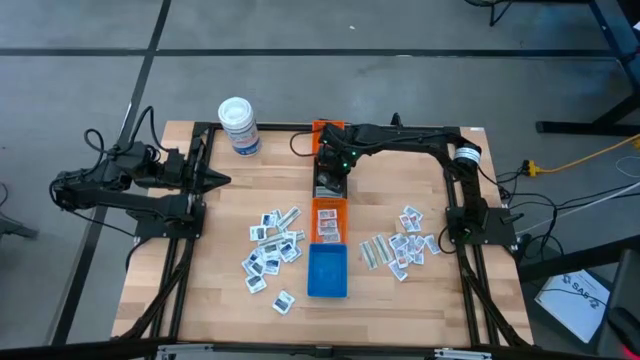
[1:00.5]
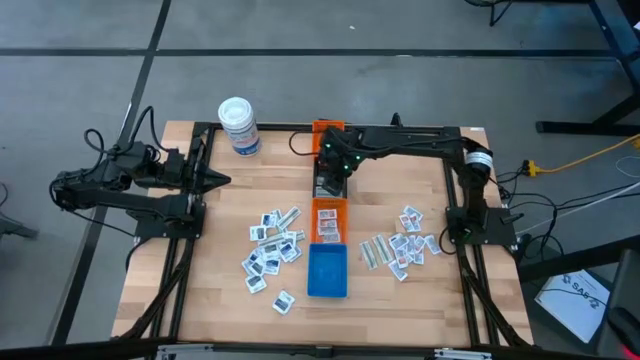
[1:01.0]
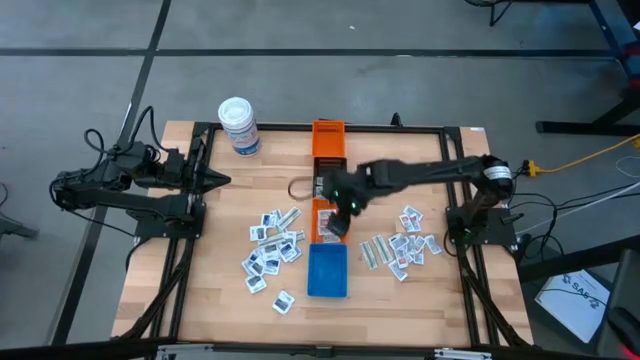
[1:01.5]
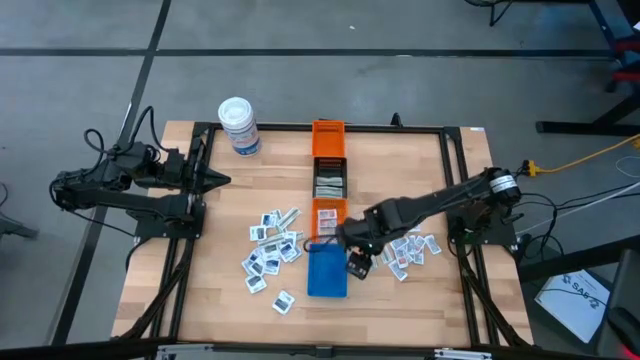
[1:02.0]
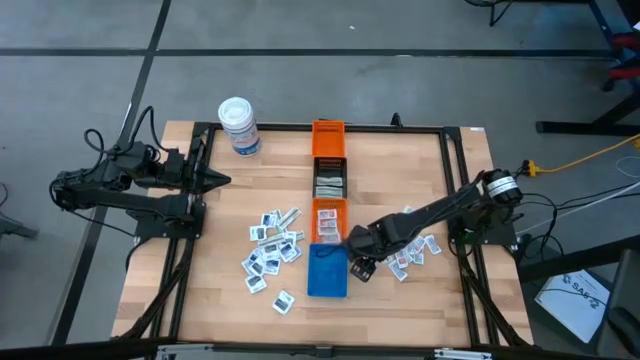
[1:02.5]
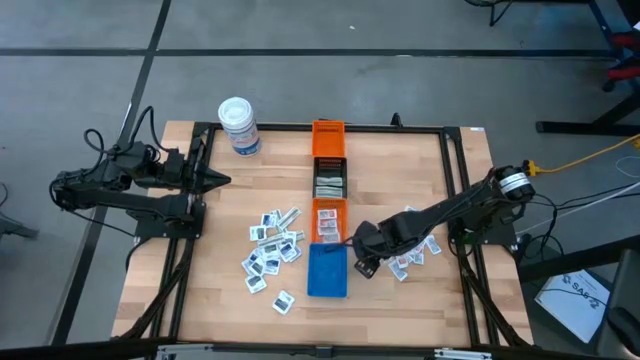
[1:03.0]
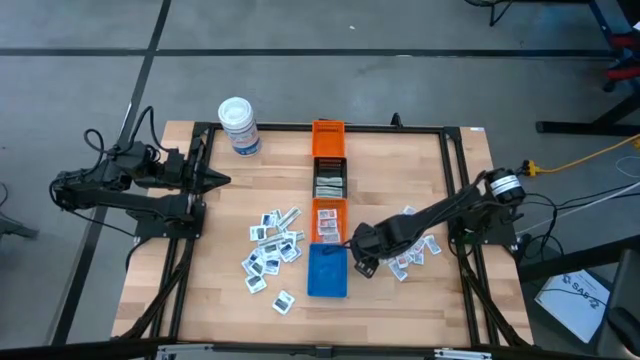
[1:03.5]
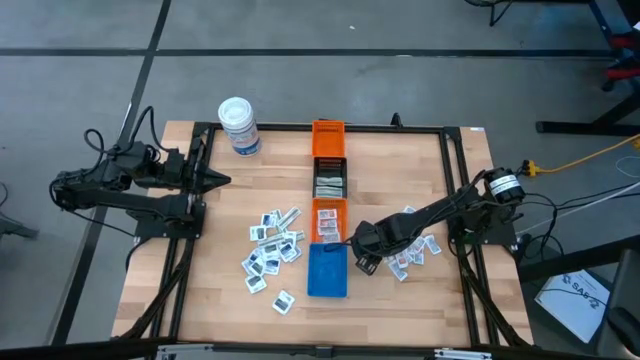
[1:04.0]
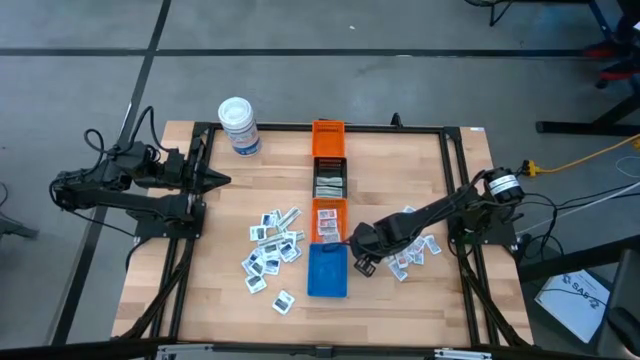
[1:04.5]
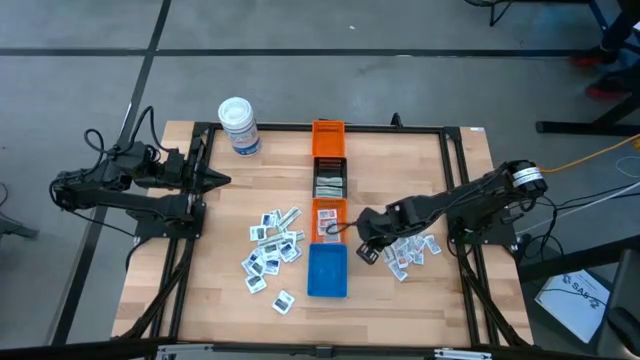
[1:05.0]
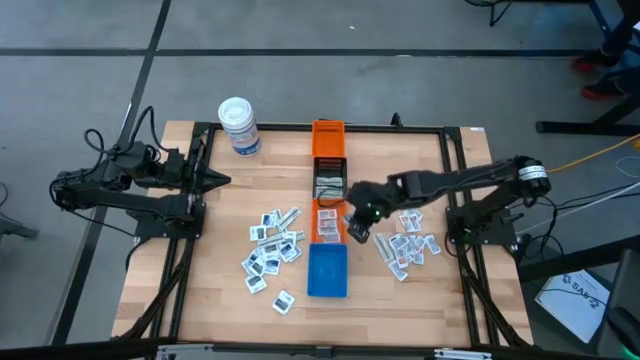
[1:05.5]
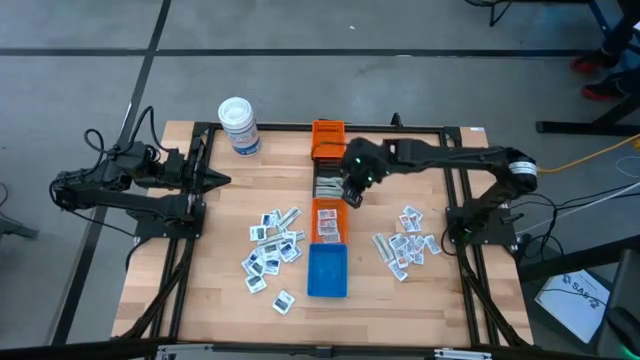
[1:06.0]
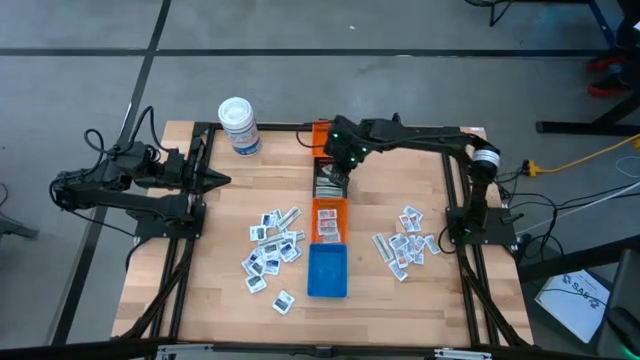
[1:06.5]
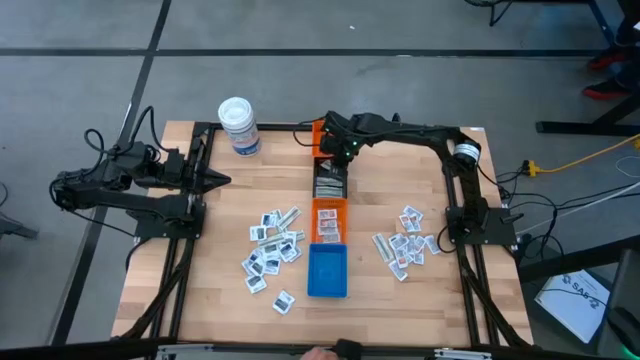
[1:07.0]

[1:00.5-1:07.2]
Task: Pick & Place First Aid Supplies
Put the green bandage into the black bin

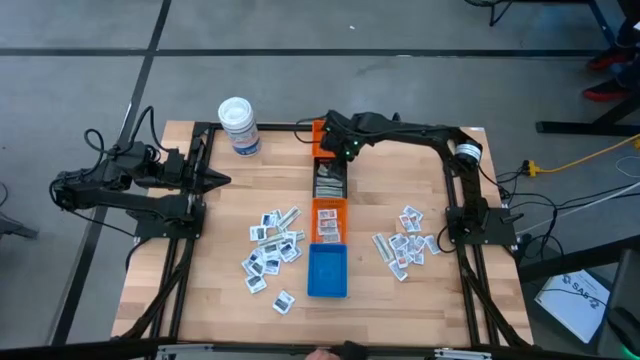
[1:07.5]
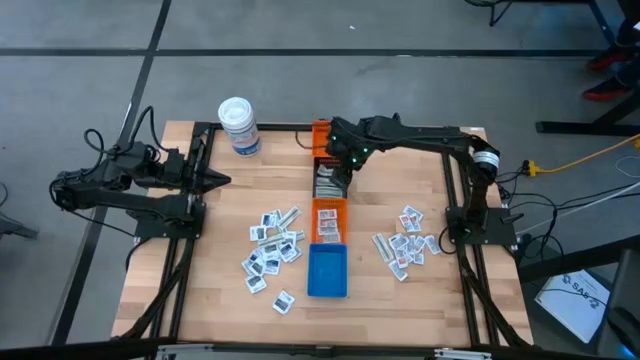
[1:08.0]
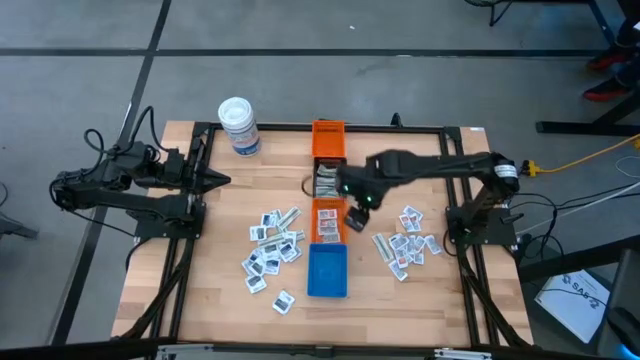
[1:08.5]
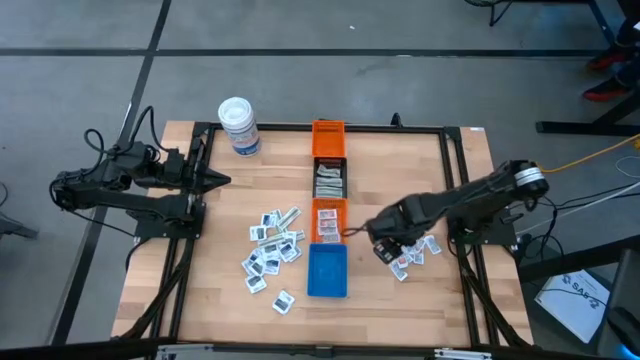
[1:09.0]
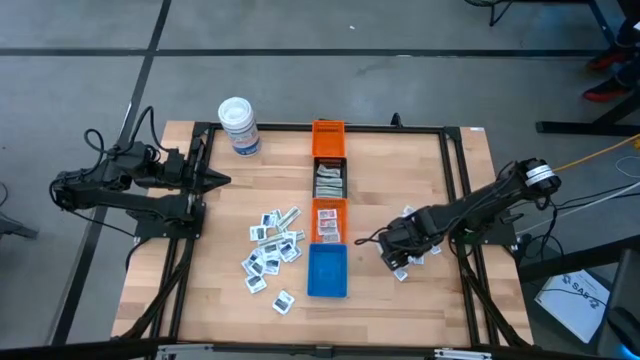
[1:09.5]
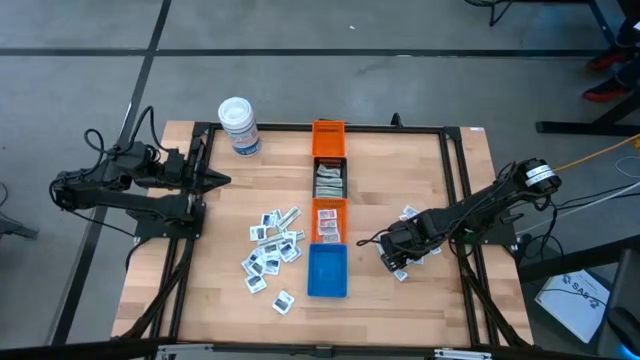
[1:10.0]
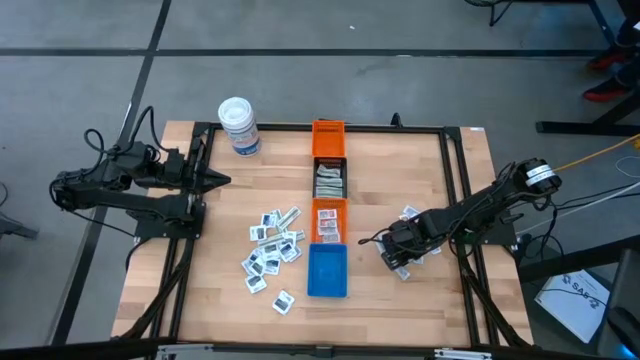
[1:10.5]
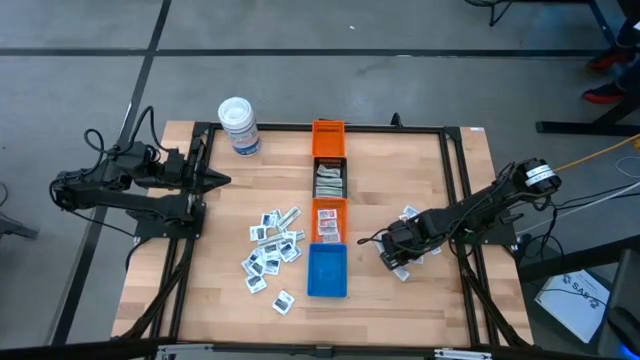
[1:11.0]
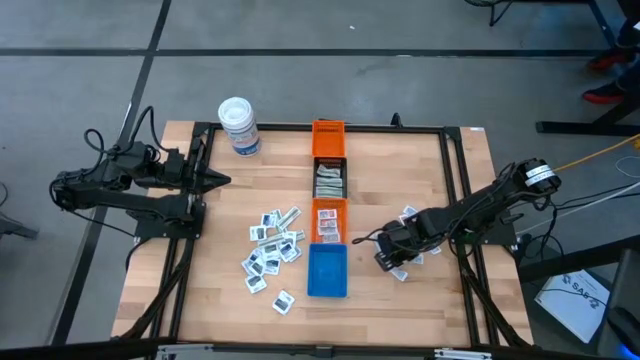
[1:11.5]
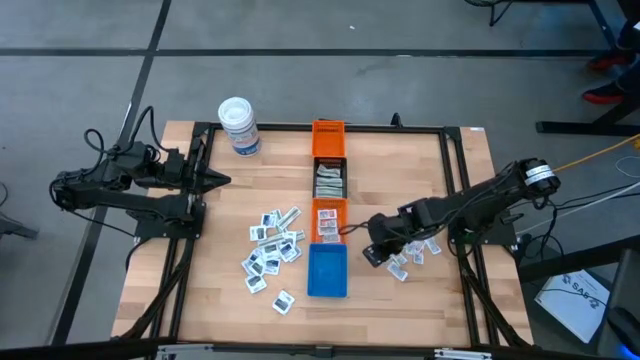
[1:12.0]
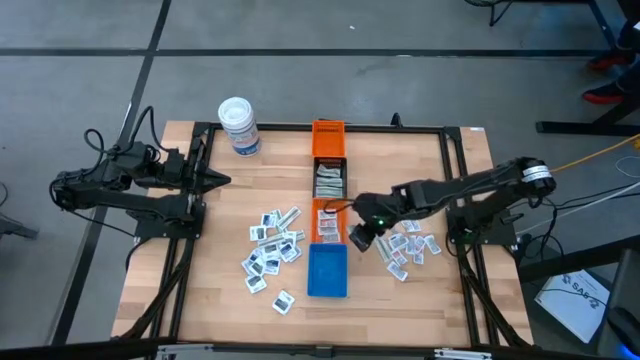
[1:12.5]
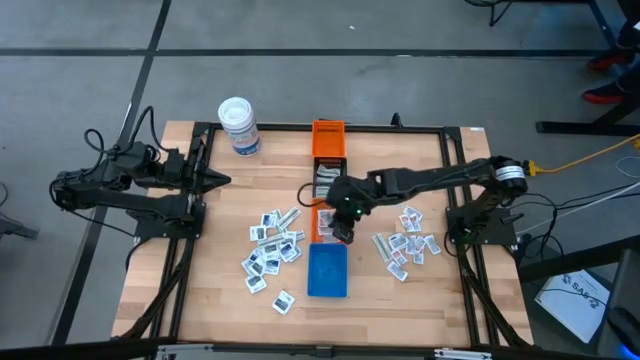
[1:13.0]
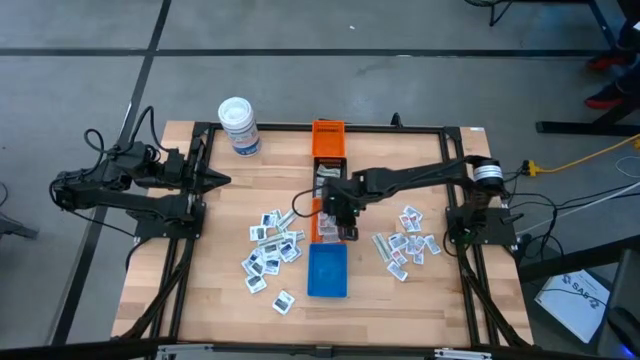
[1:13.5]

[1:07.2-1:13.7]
Put the orange ointment pack into the bottom orange bin

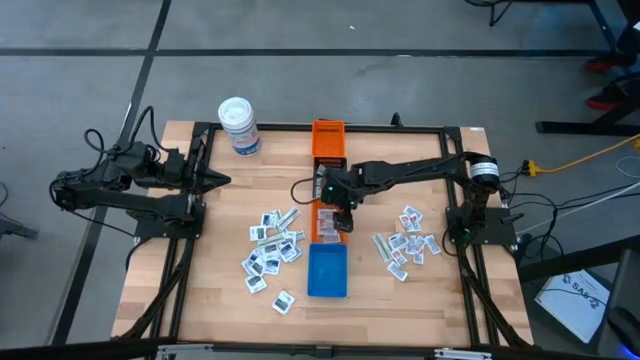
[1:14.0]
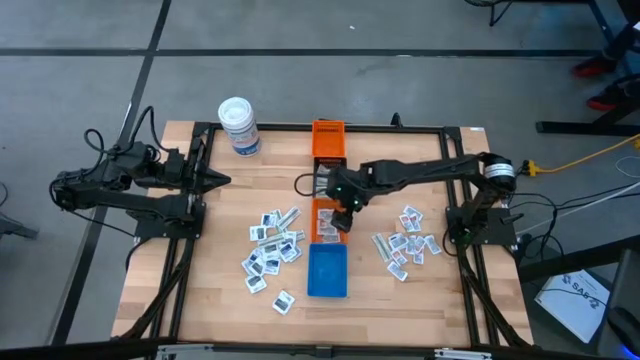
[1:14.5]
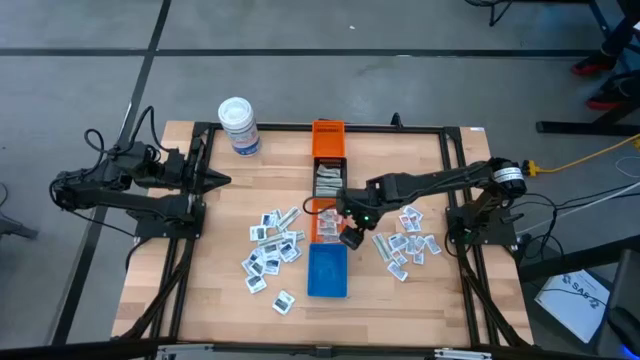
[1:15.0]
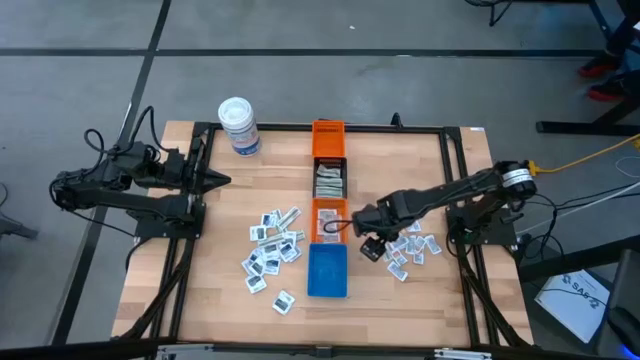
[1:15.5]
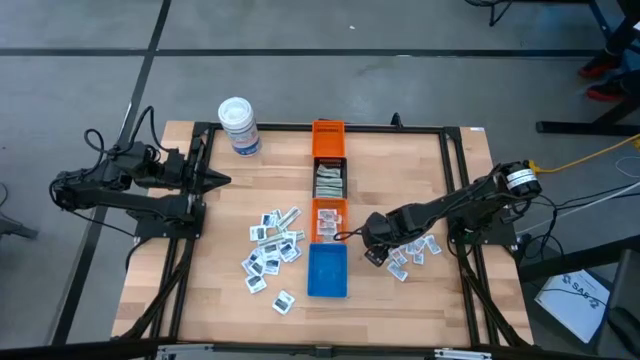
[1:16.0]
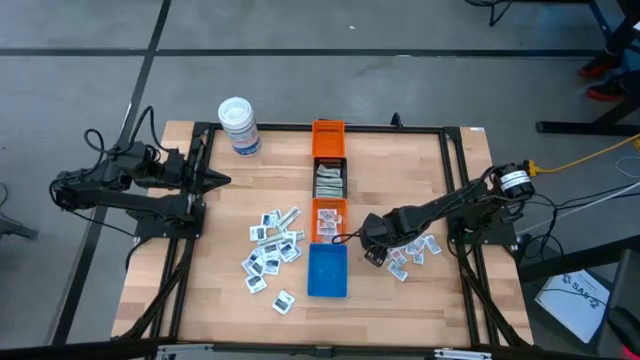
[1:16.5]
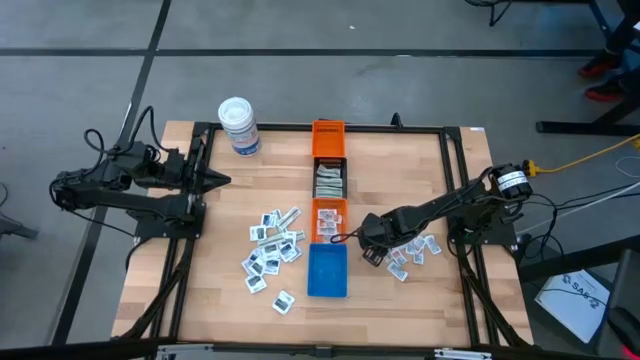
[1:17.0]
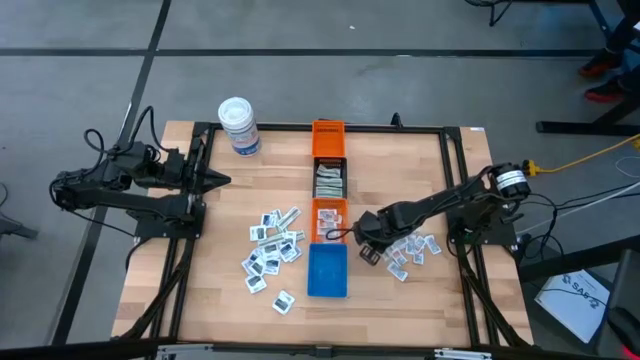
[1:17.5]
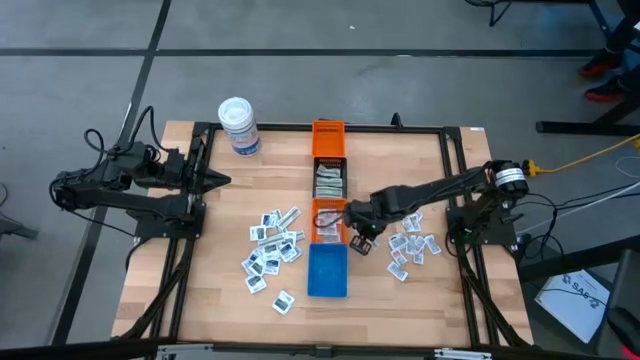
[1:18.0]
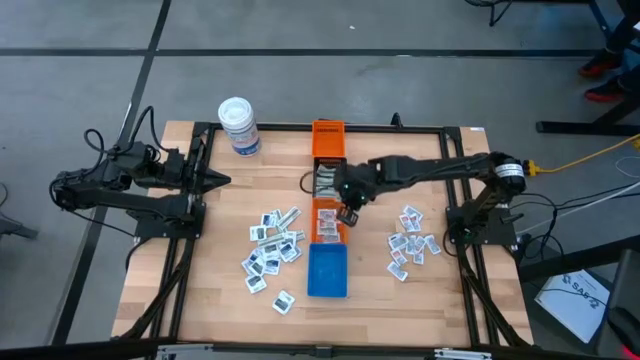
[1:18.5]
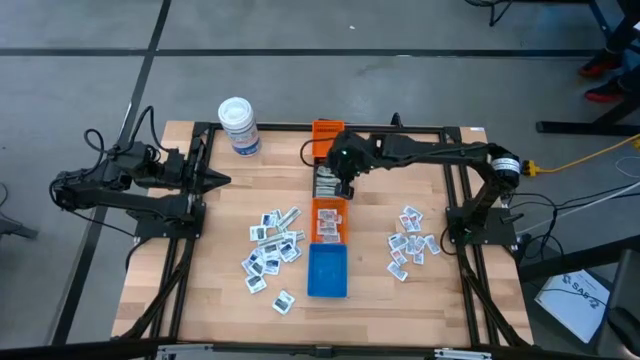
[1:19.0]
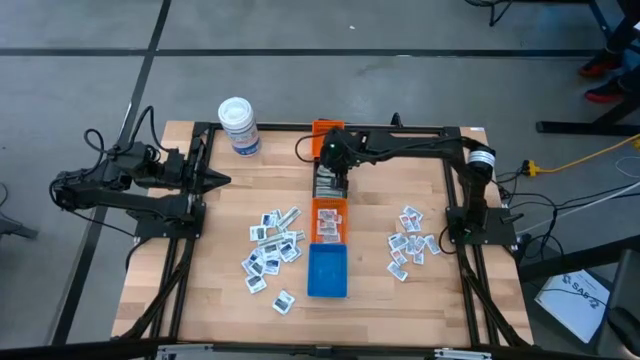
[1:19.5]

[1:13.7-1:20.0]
Put the green bandage into the black bin

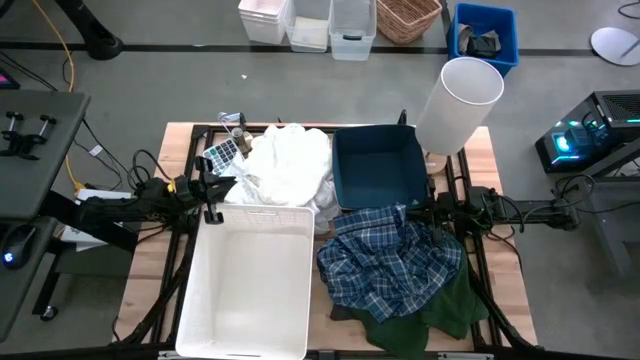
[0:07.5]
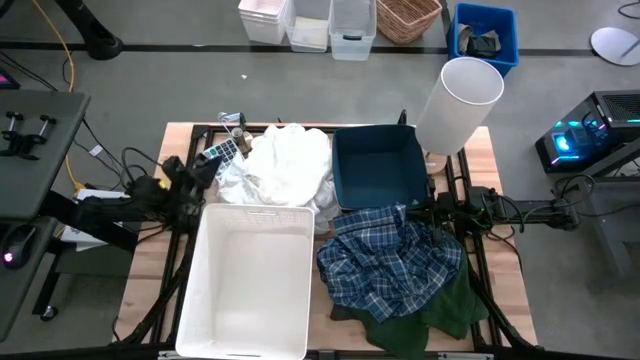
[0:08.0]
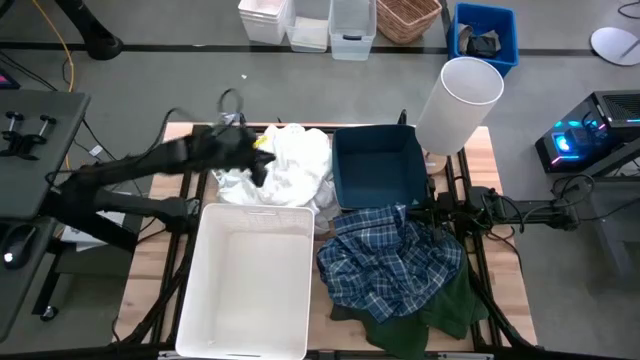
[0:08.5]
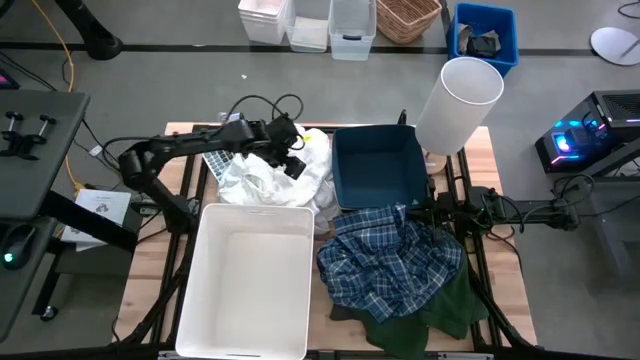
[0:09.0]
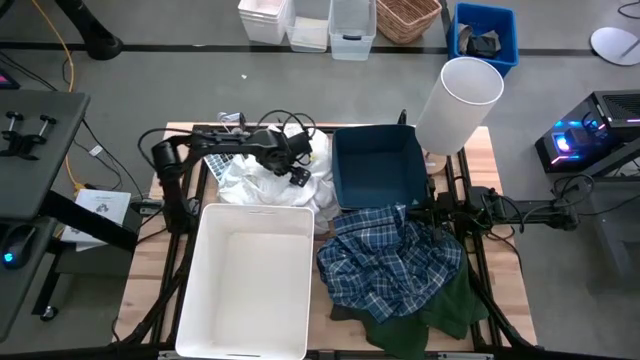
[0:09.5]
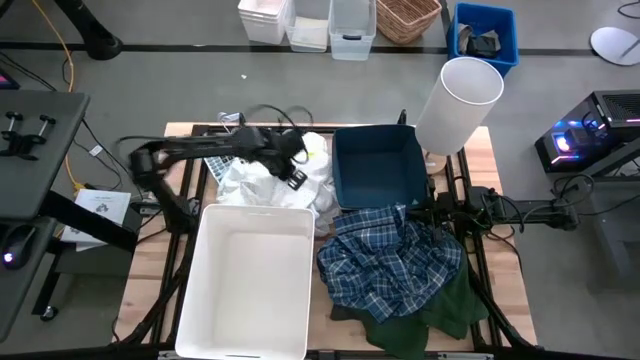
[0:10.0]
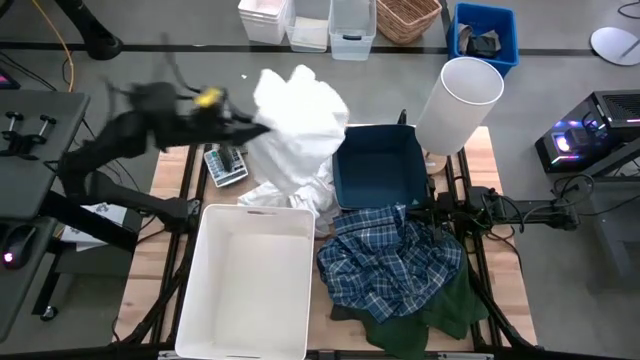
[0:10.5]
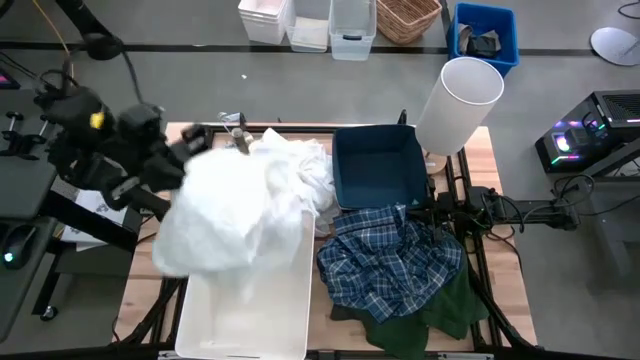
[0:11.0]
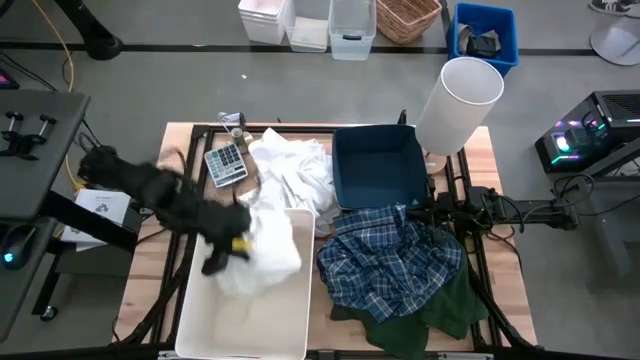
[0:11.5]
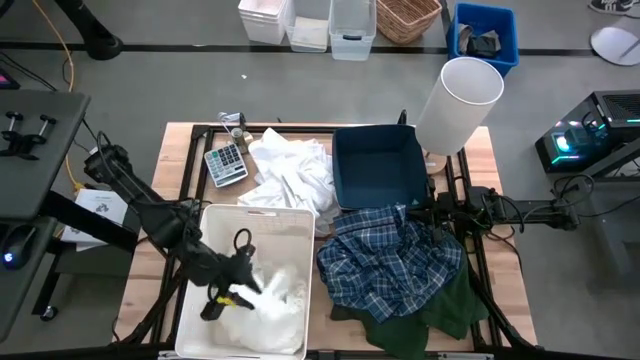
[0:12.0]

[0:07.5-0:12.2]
Task: Sort clothes
Put the white shirt into the white bin
